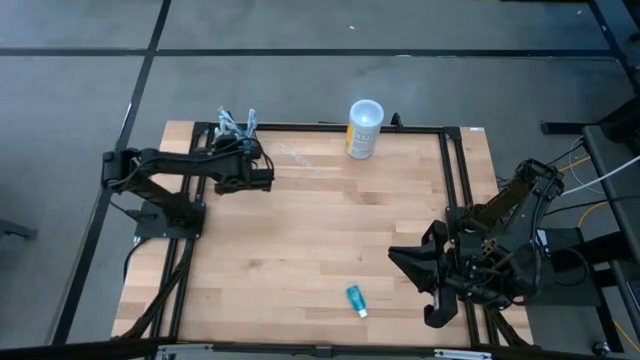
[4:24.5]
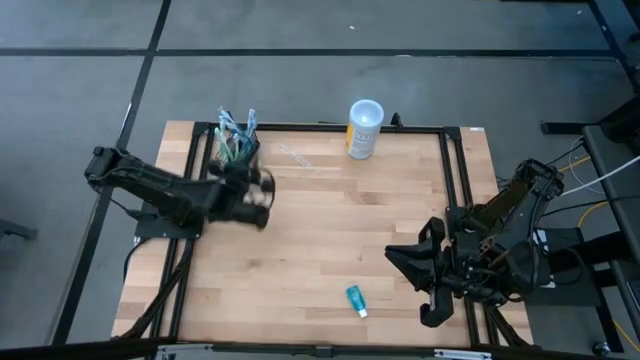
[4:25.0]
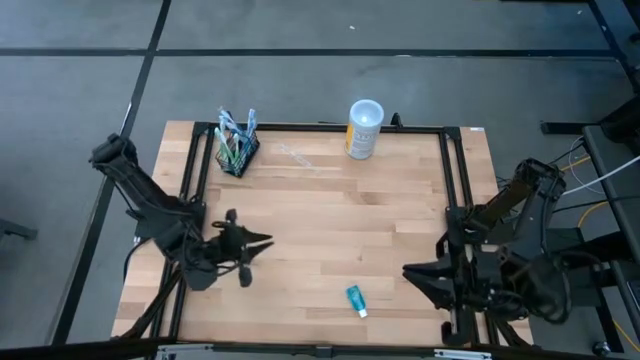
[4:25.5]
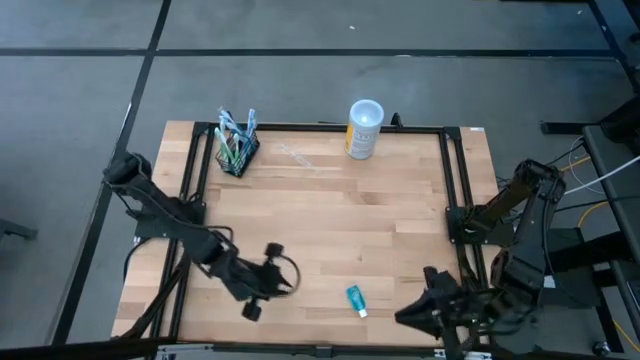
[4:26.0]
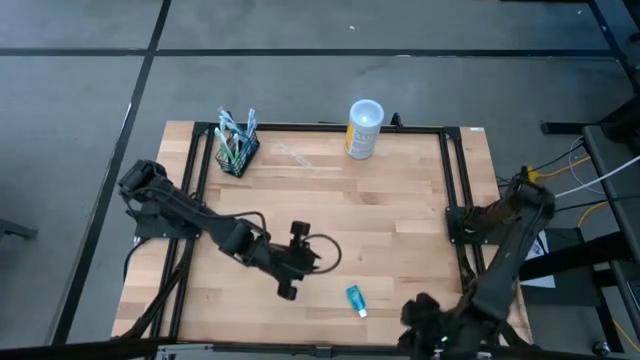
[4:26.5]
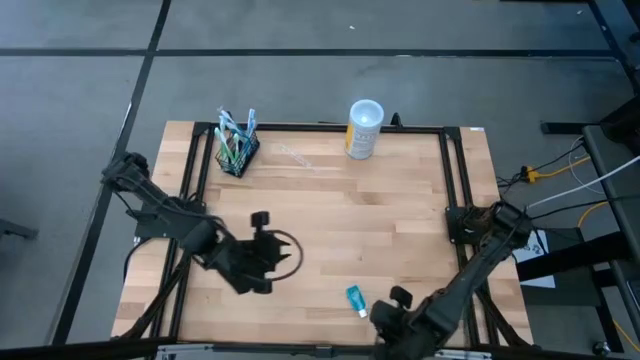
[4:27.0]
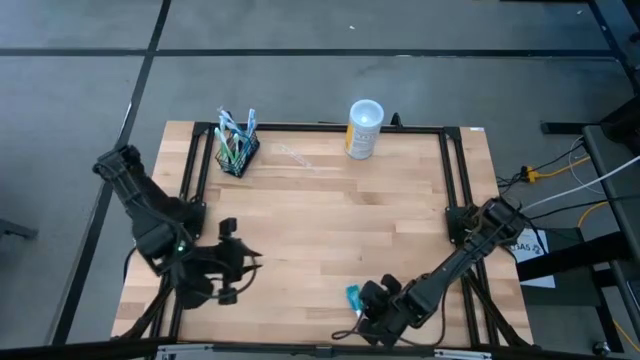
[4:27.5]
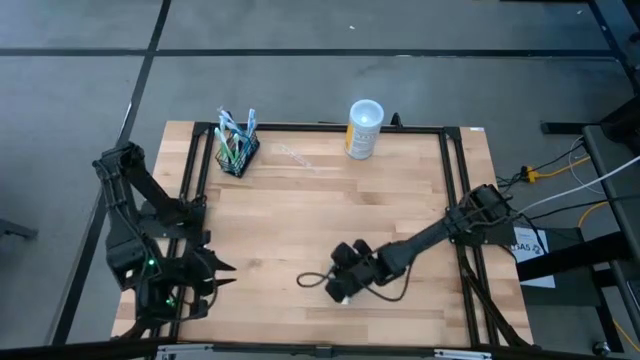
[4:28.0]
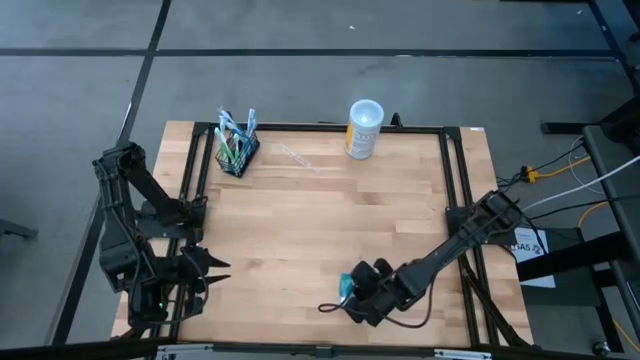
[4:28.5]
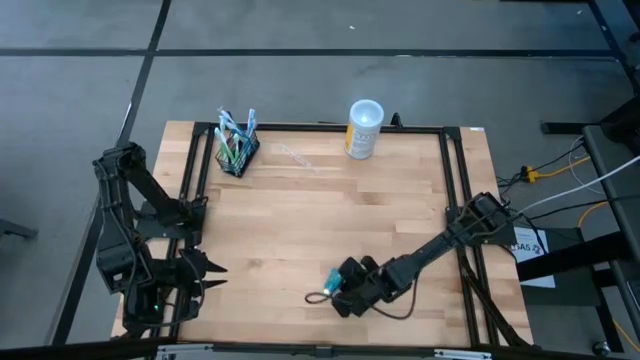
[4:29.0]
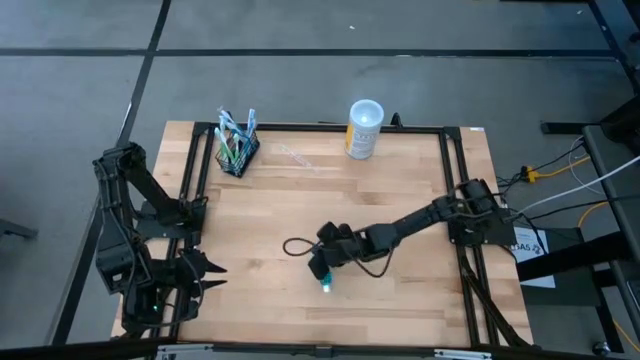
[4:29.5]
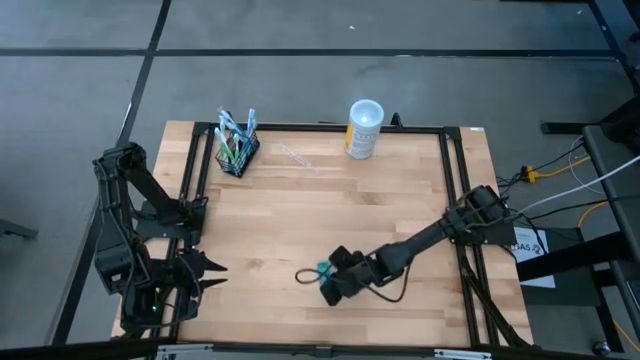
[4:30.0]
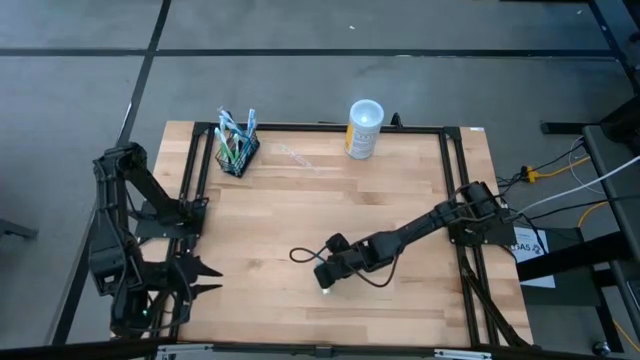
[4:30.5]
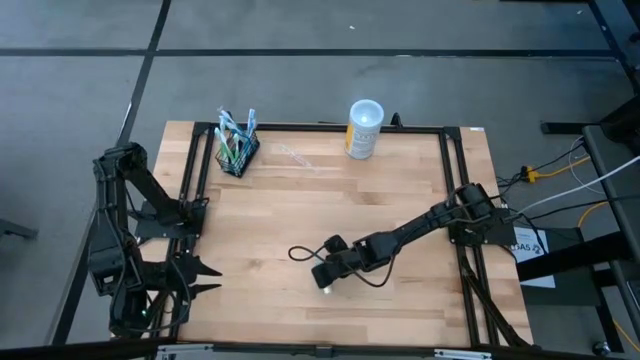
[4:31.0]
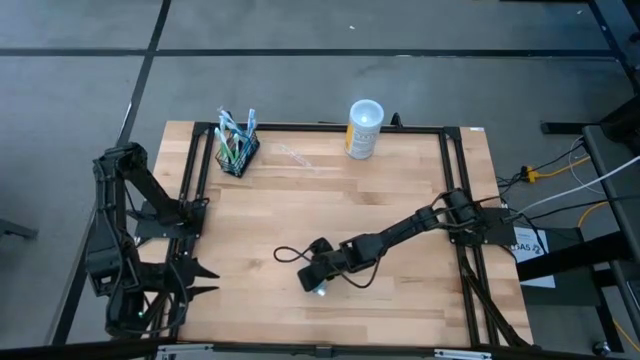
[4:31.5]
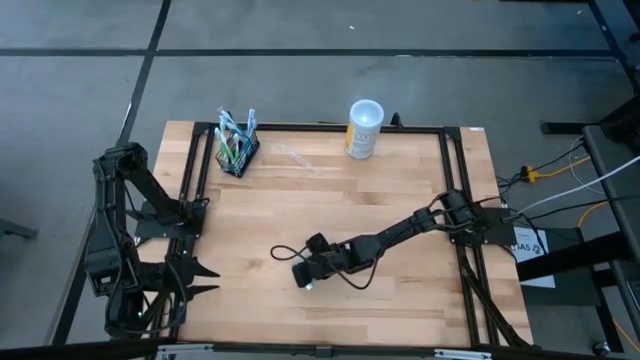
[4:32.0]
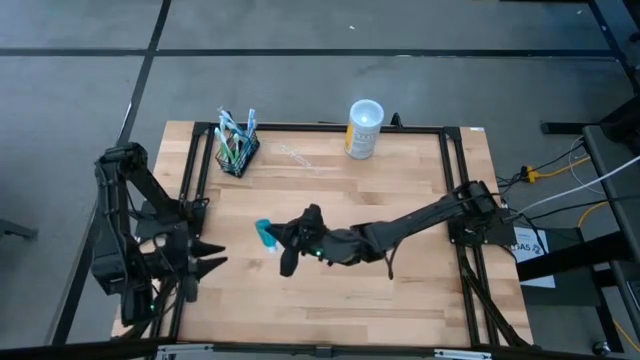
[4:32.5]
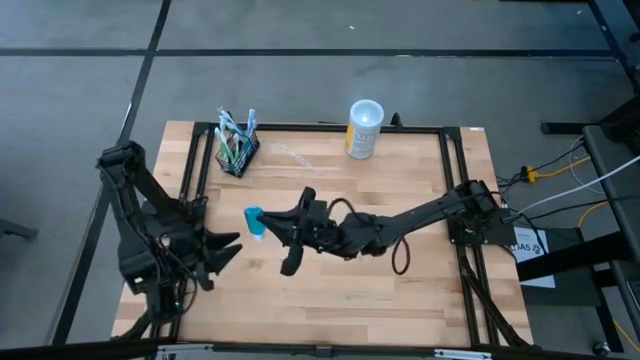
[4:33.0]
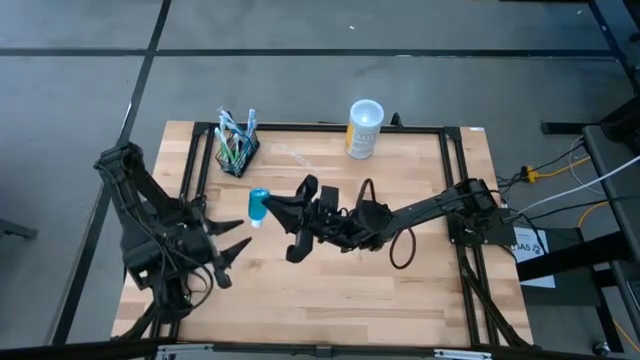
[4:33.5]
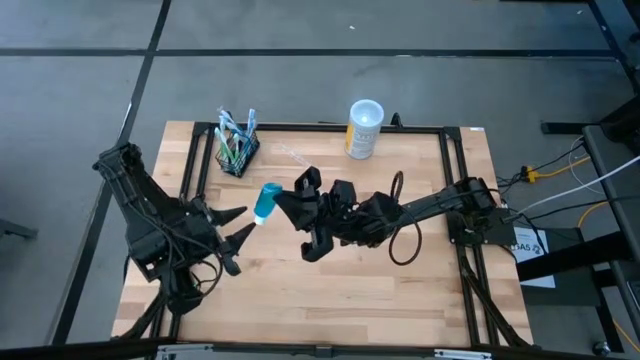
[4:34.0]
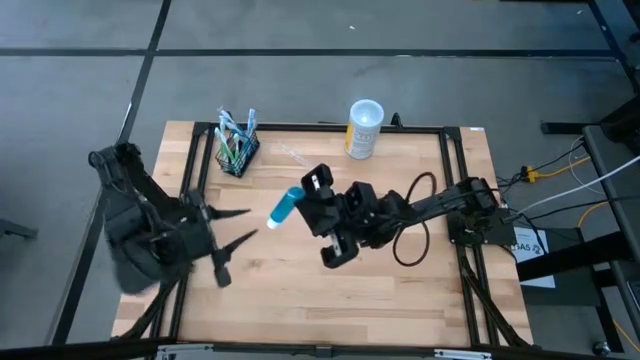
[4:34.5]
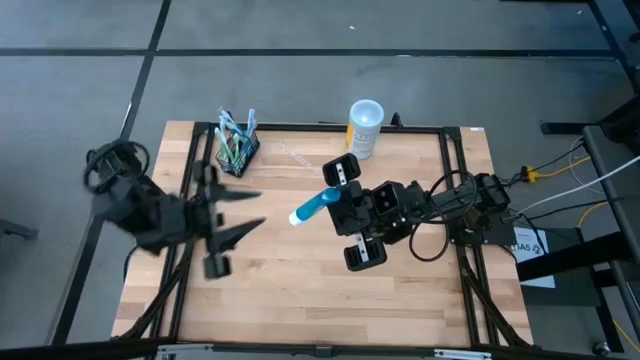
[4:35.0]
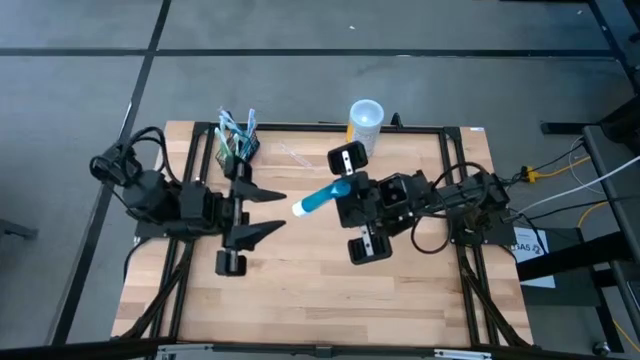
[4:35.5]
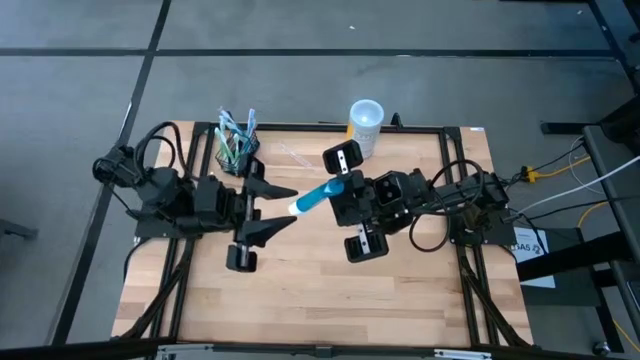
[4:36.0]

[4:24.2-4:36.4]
Task: Pick & Place toothbrushing station
Put the blue mouthwash bottle into the middle section of the black organizer

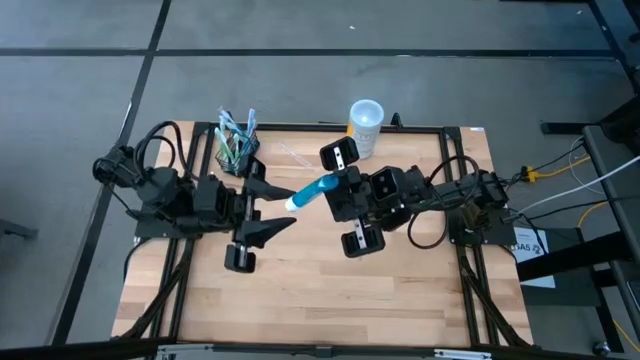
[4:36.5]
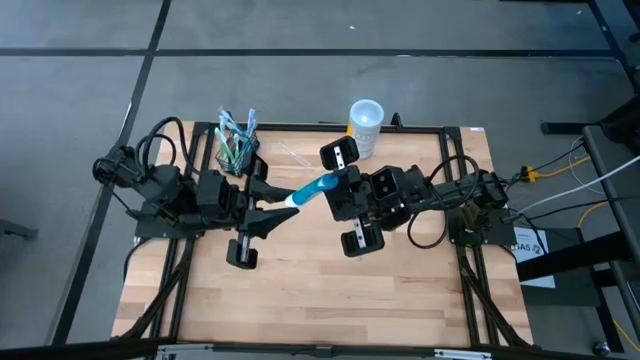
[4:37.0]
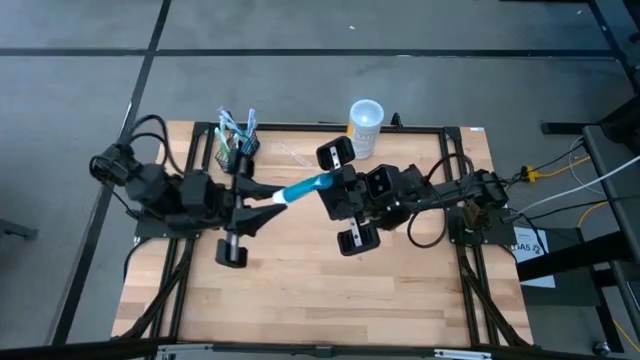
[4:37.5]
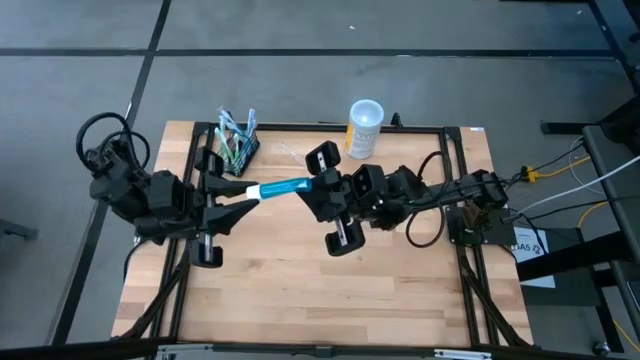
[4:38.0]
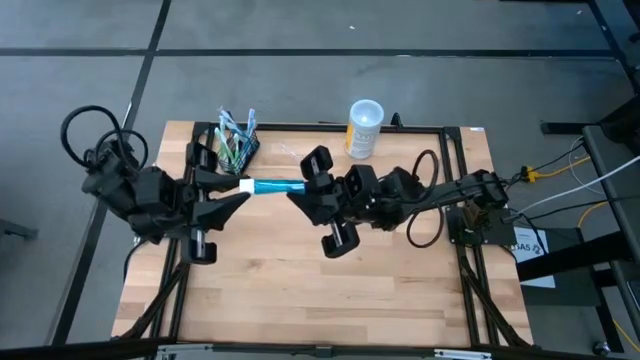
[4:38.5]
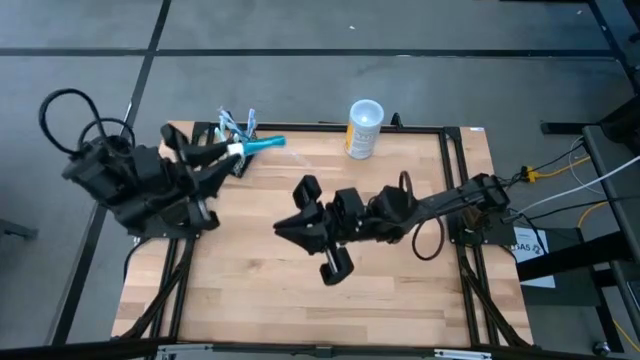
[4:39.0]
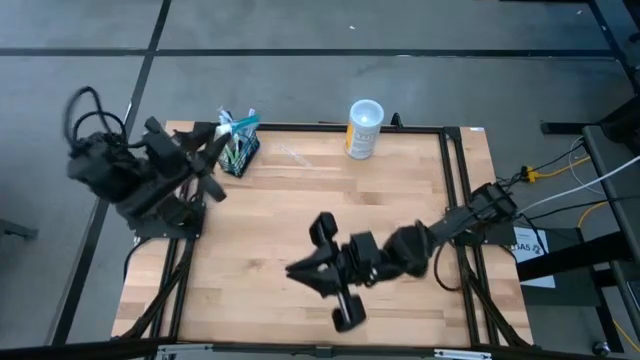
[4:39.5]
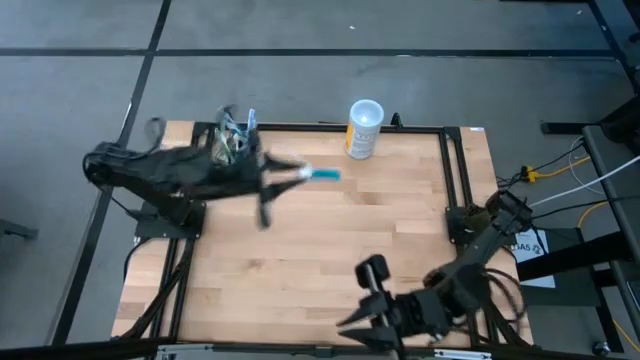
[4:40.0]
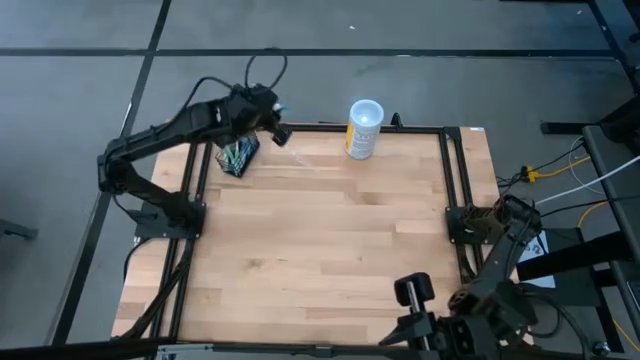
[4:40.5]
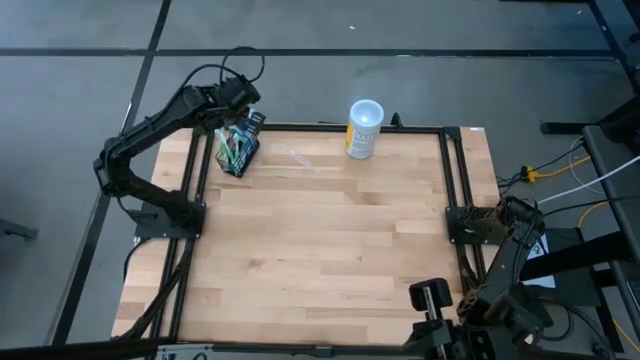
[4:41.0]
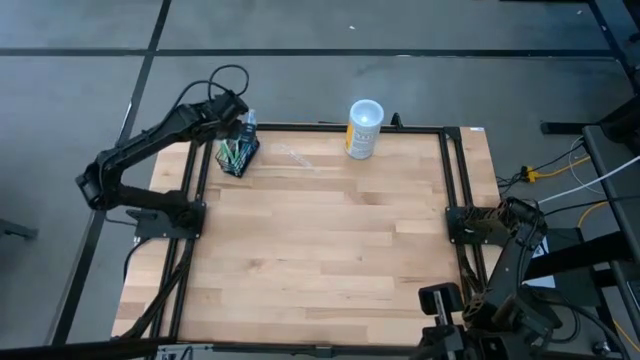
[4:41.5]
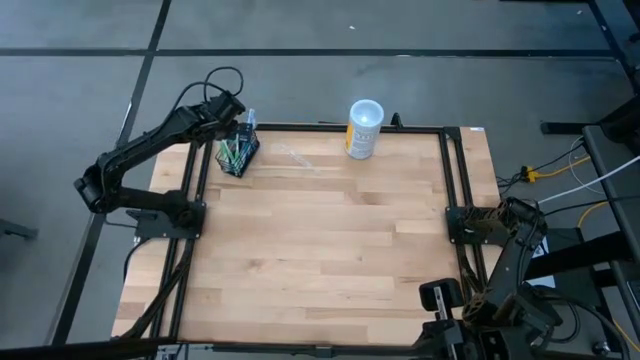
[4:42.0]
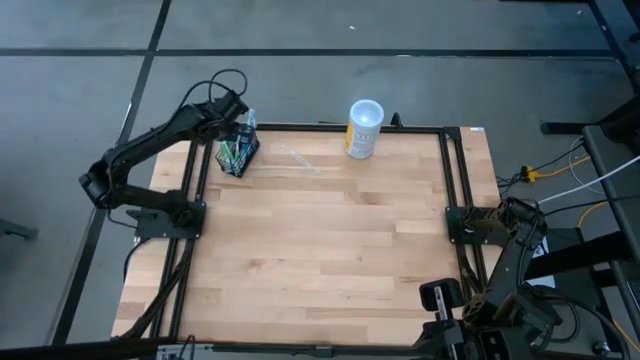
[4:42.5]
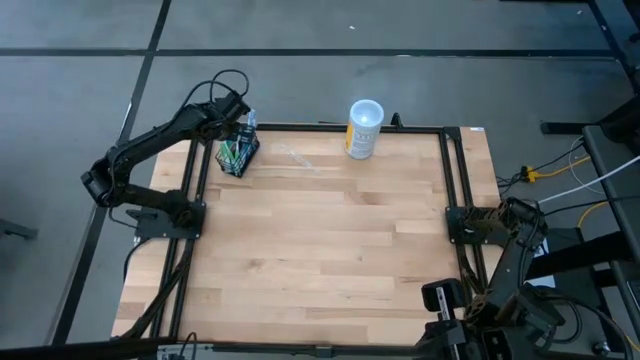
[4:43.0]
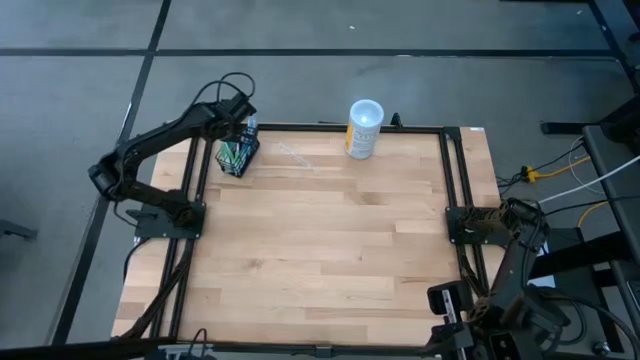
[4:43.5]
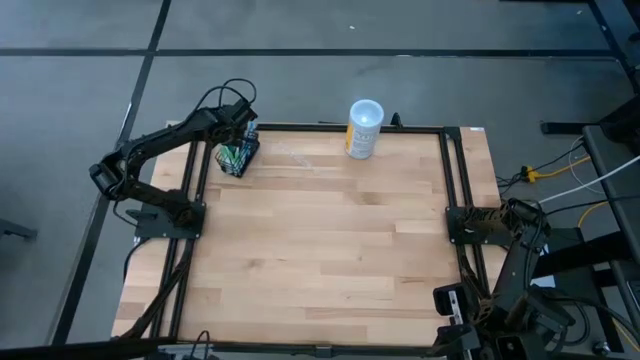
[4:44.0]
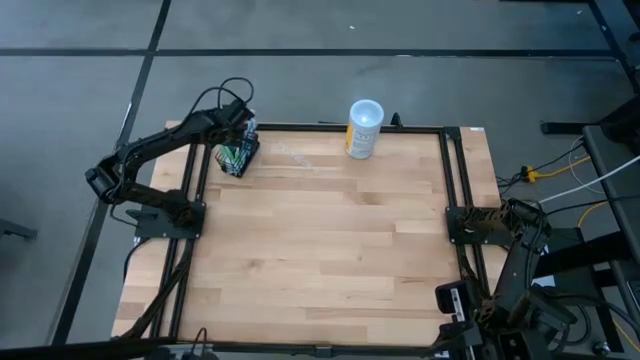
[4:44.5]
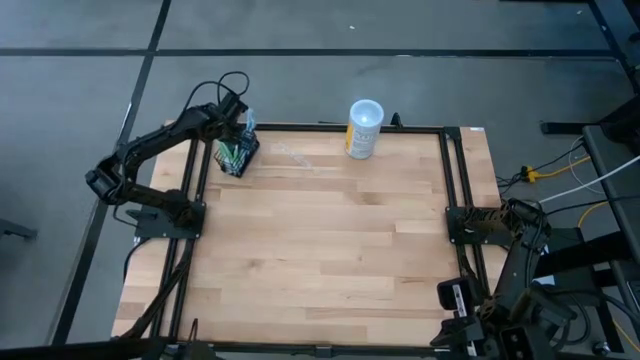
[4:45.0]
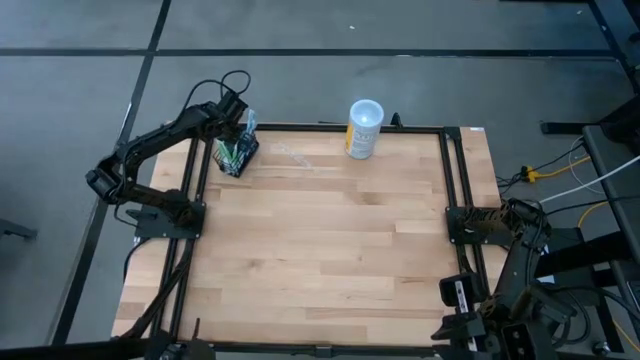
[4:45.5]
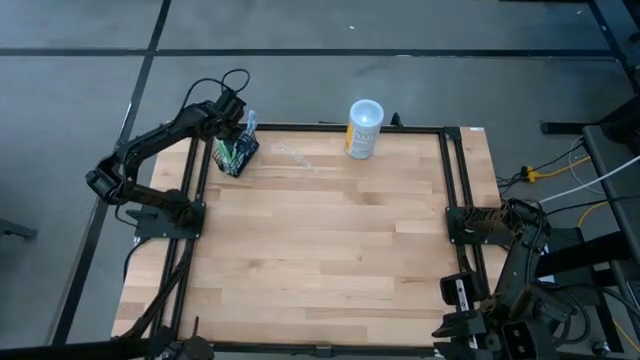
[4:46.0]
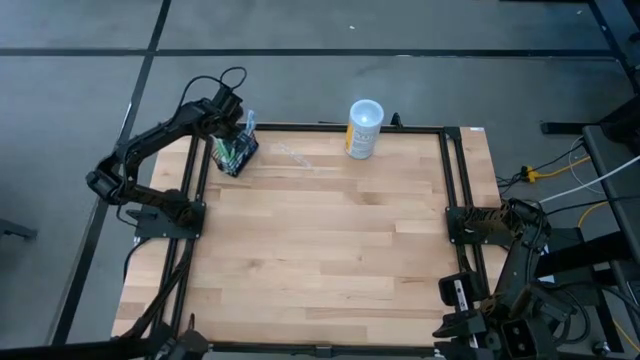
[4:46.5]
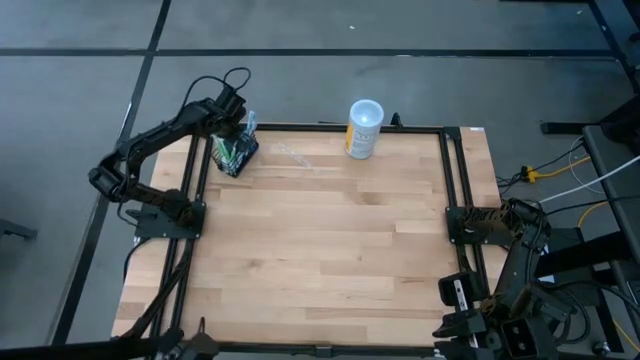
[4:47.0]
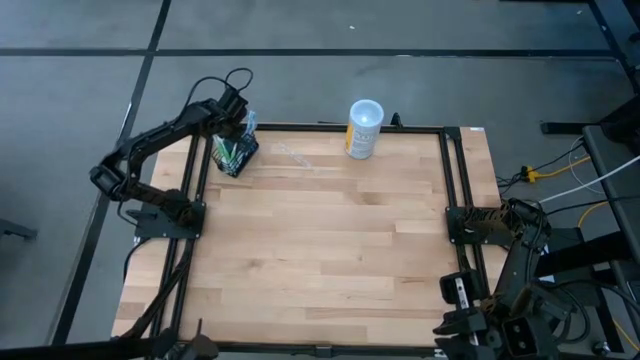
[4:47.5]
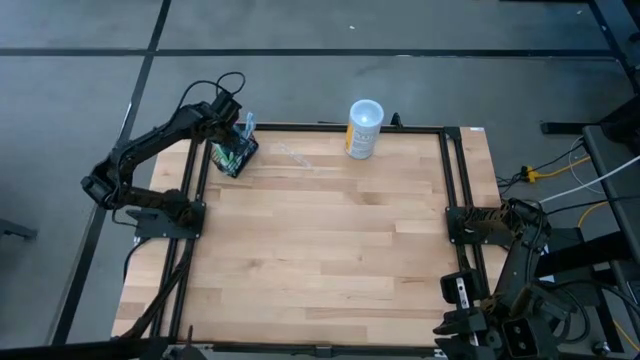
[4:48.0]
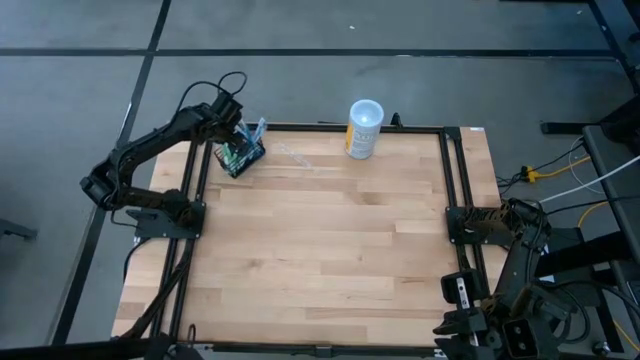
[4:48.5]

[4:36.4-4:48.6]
Put the blue mouthwash bottle into the middle section of the black organizer
